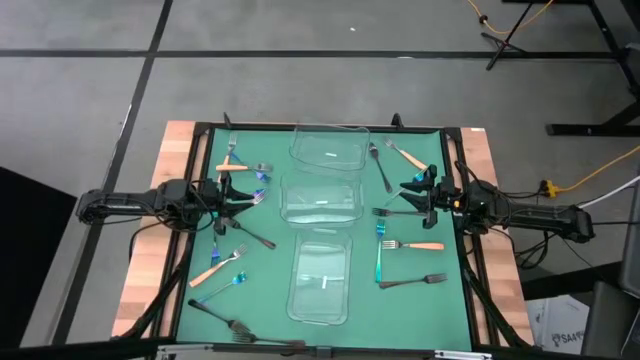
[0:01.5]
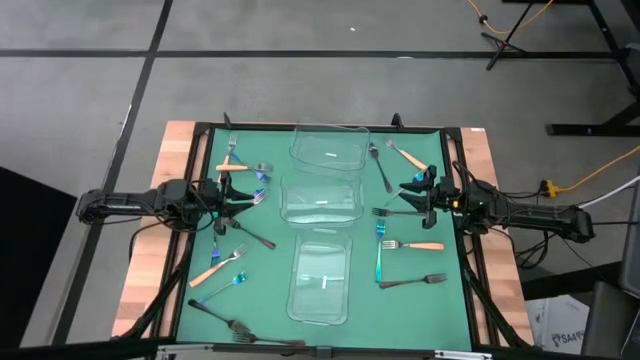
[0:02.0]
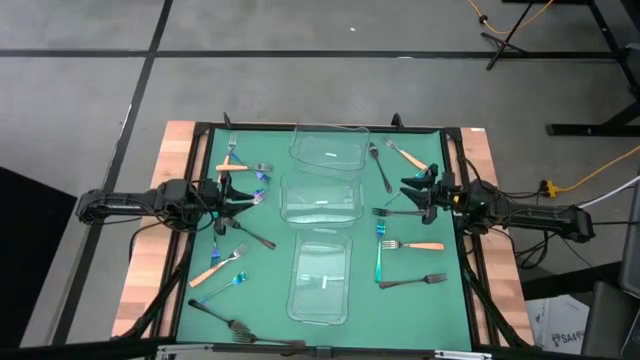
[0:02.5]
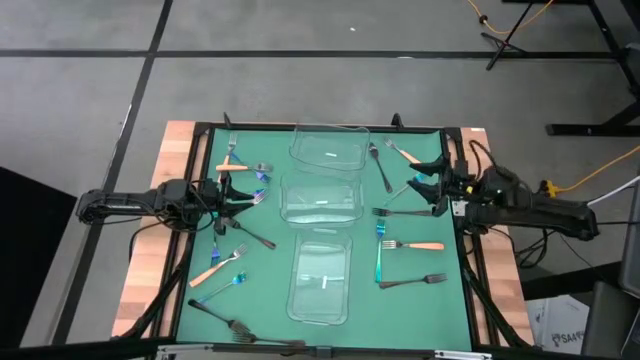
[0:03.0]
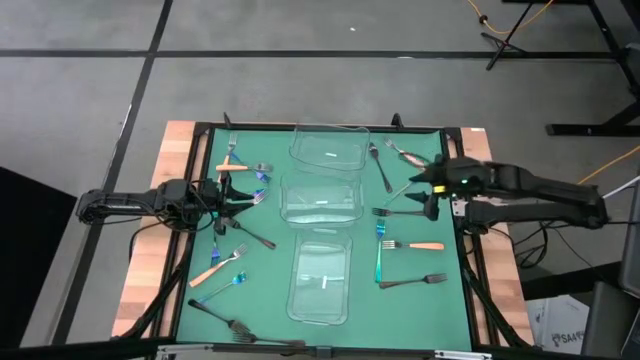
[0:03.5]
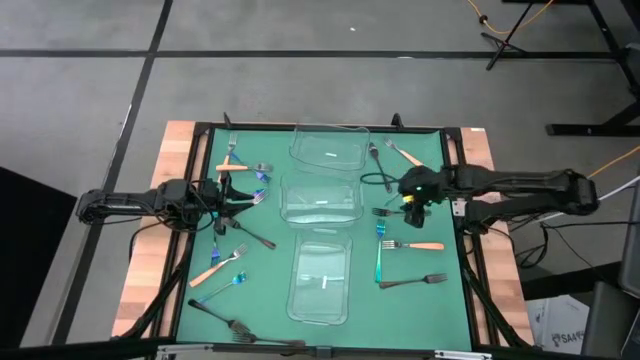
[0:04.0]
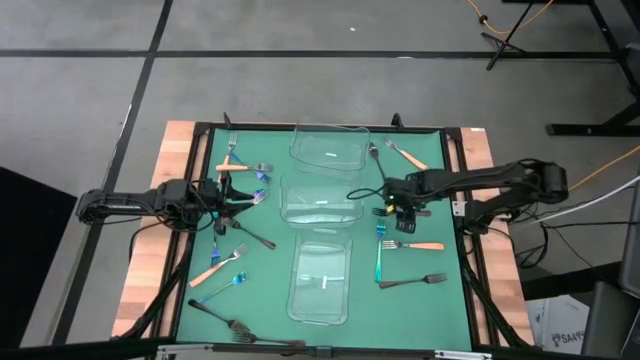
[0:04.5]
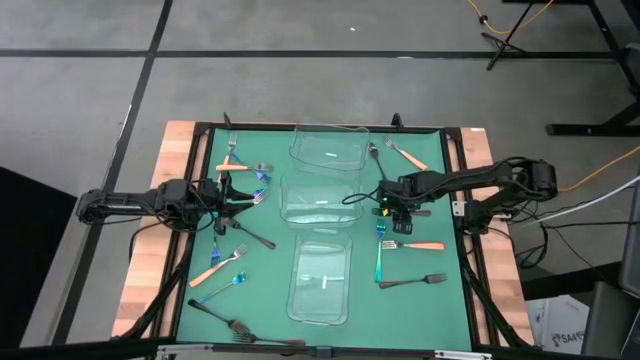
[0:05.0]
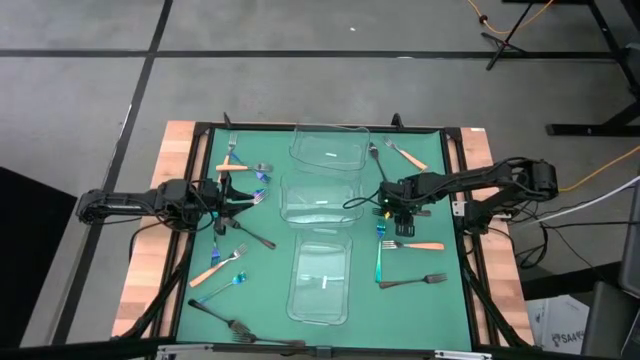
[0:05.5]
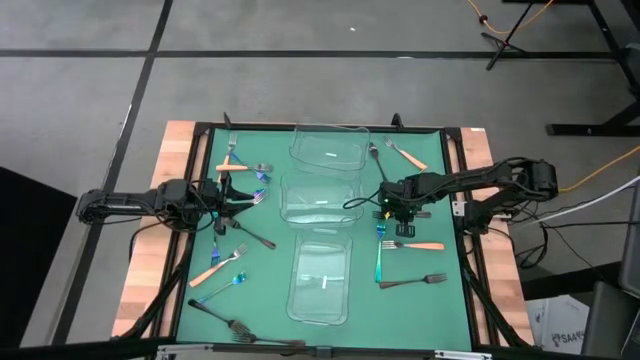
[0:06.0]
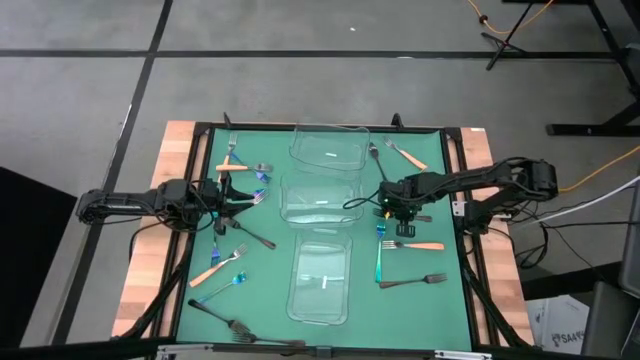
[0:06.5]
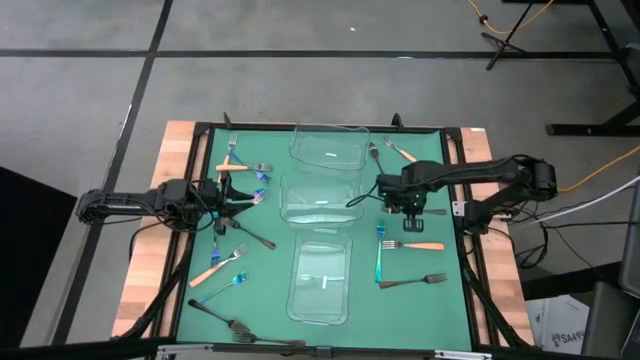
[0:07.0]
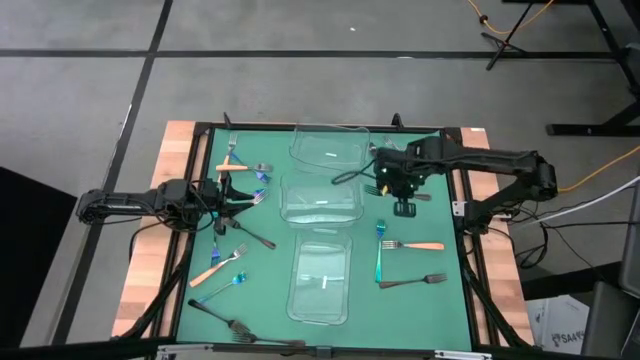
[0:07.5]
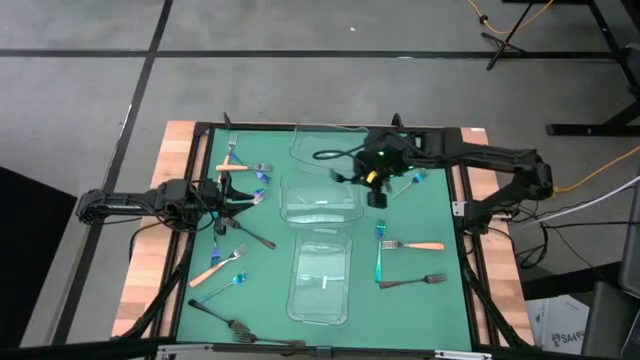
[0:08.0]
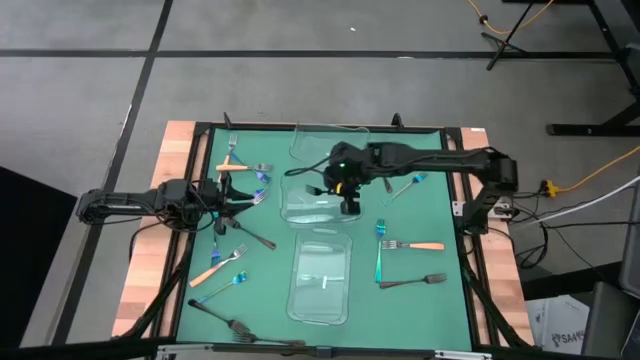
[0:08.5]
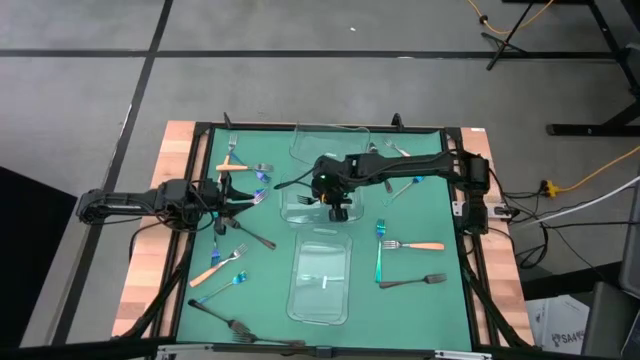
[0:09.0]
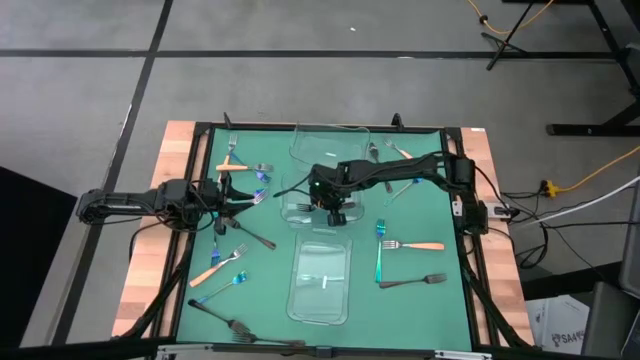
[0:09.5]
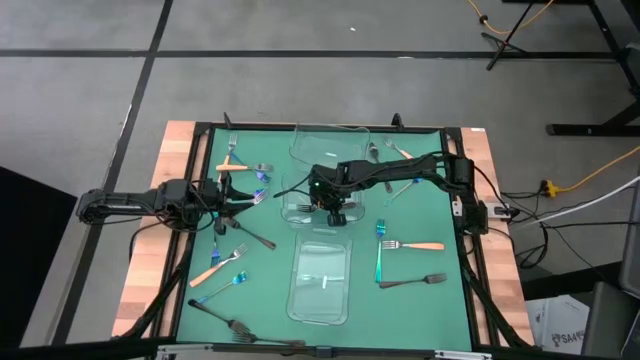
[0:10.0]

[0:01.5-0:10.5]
Task: Sort silverware by color (type)
Put the black fork into the middle transparent bin

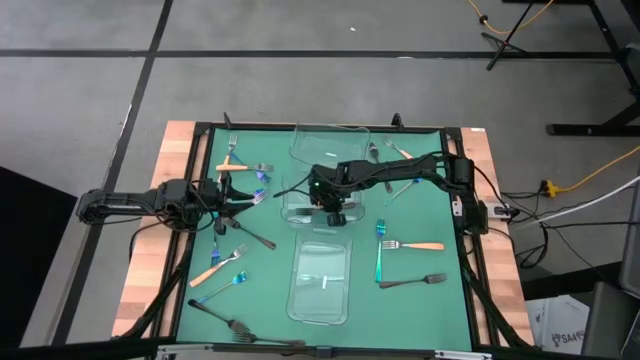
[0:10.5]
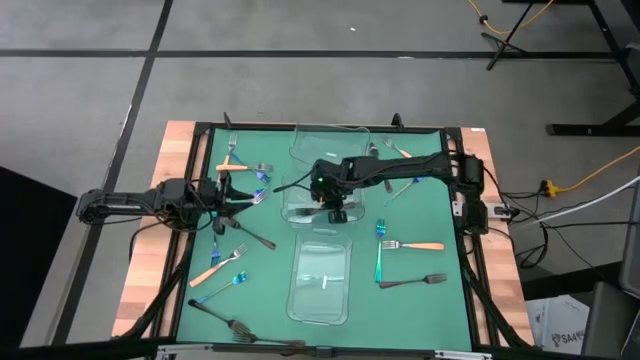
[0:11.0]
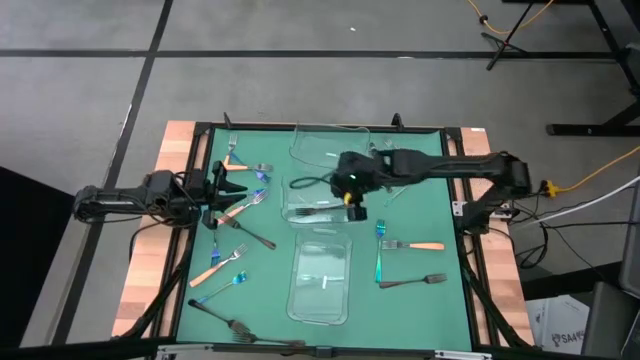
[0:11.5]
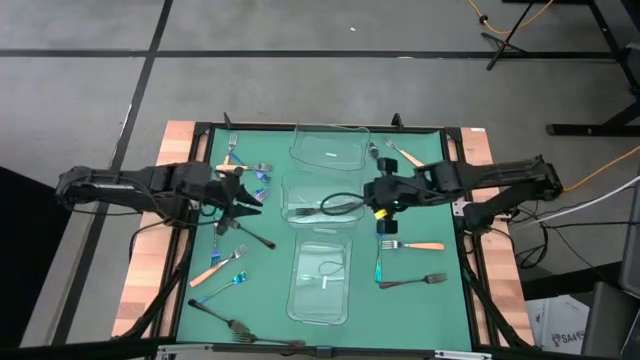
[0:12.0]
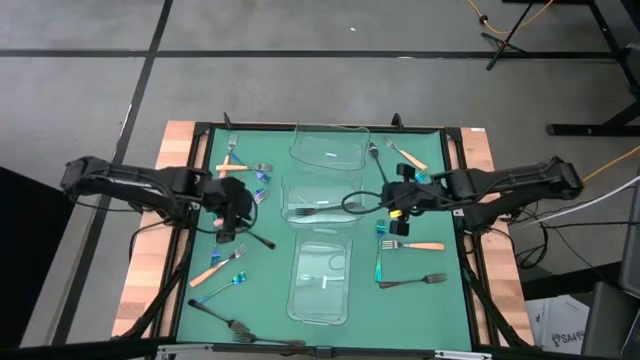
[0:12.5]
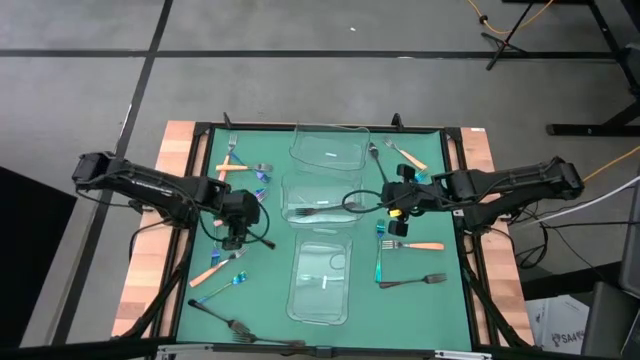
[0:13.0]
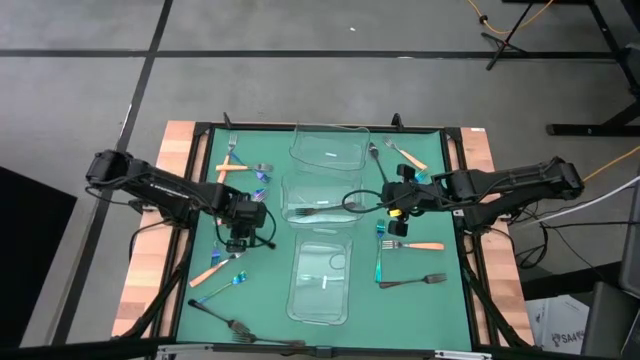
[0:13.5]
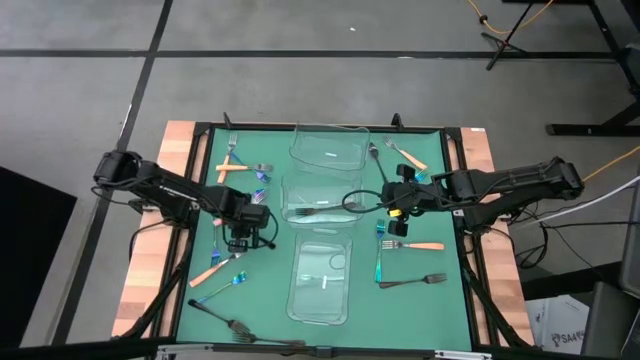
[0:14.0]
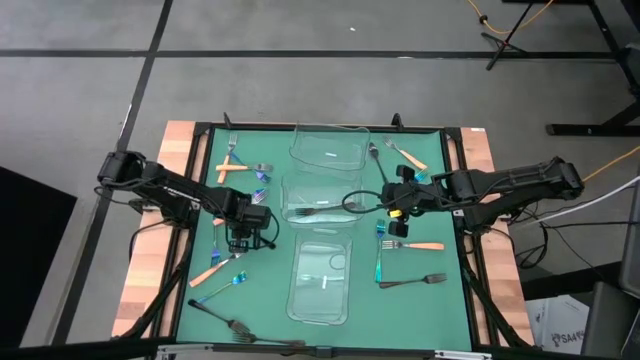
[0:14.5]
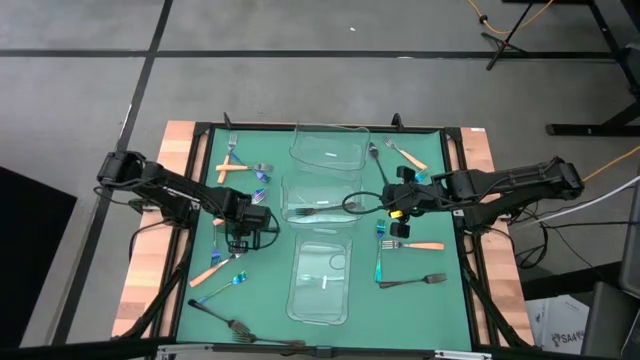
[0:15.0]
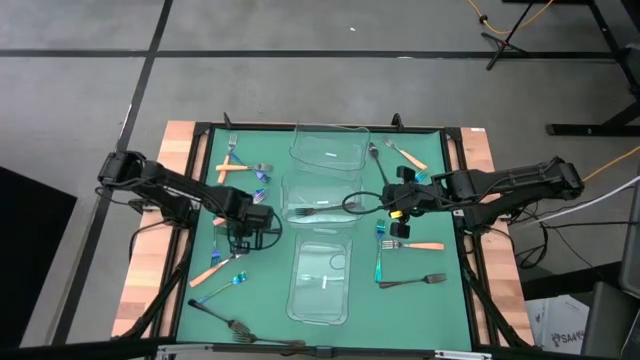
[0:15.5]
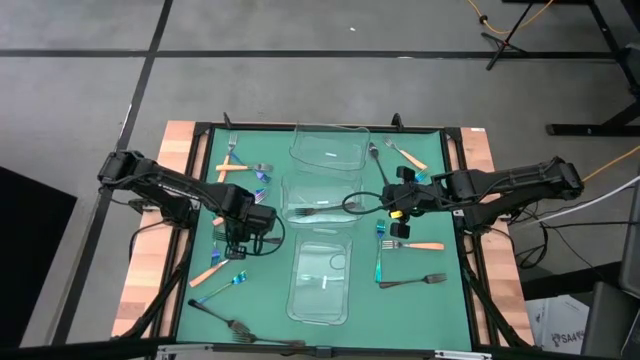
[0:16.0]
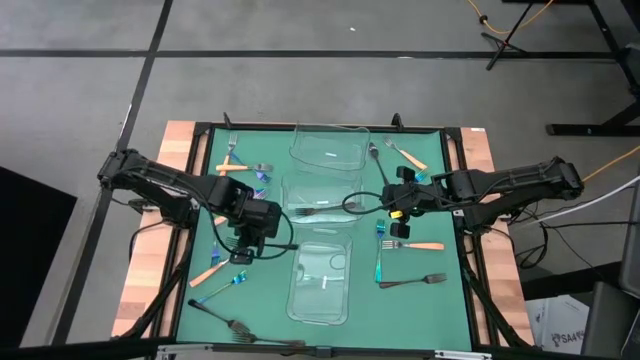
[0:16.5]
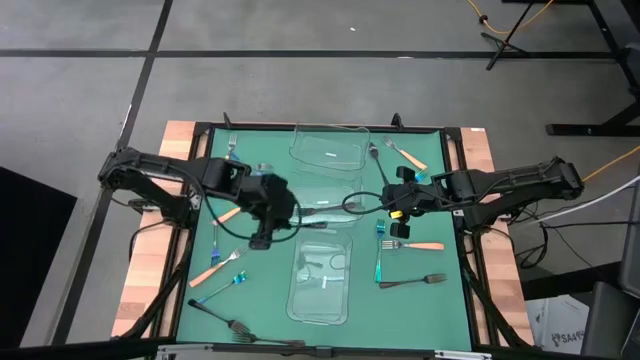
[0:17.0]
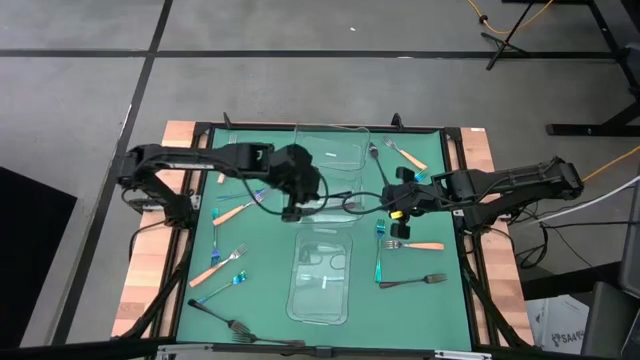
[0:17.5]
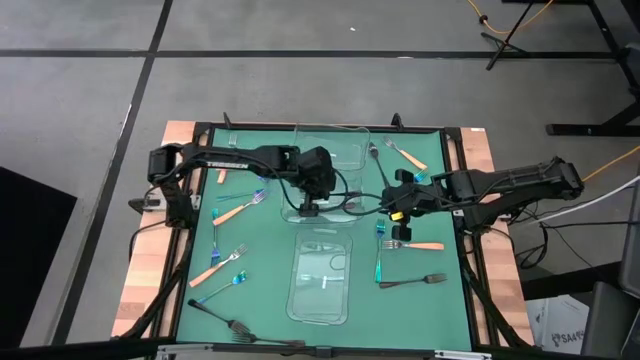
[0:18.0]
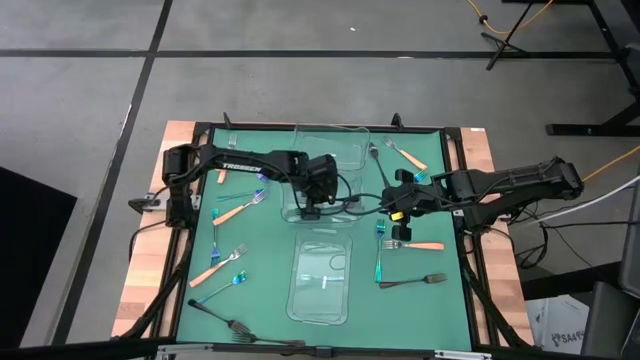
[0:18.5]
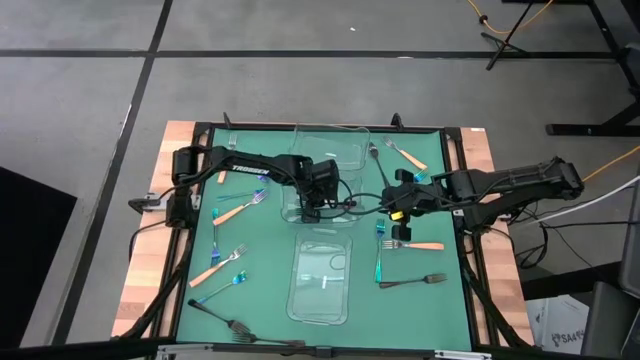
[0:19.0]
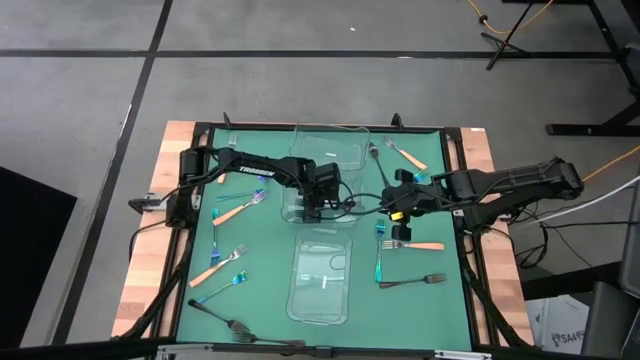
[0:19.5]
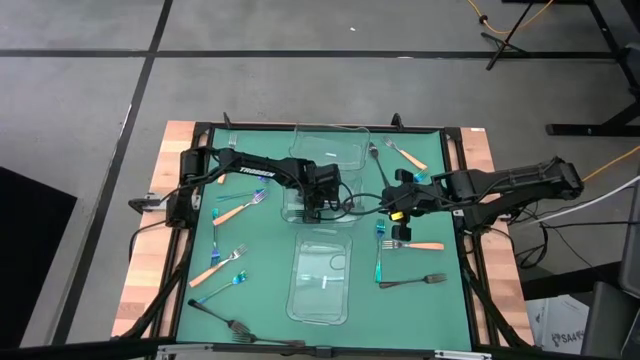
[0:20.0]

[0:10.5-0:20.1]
Put the black fork into the middle transparent bin

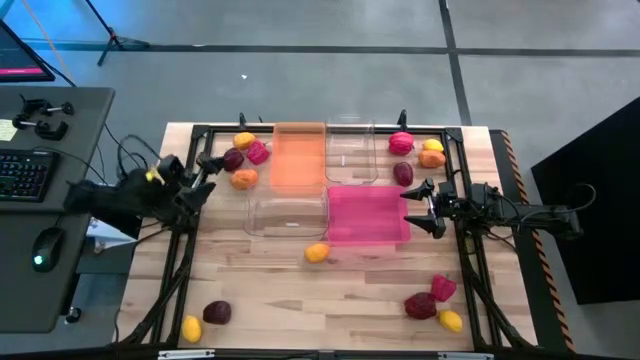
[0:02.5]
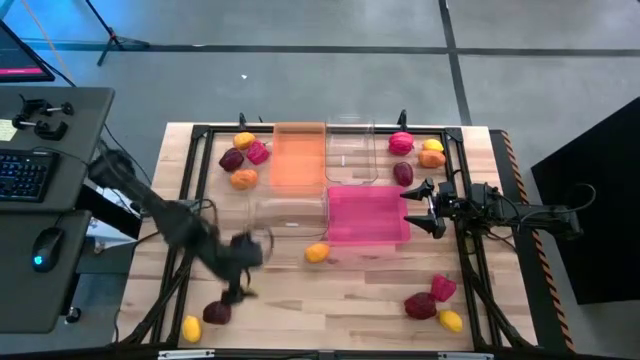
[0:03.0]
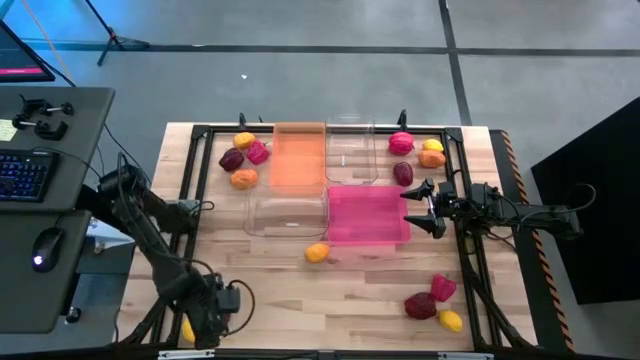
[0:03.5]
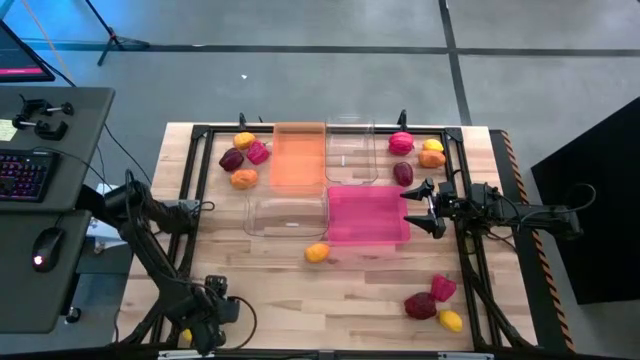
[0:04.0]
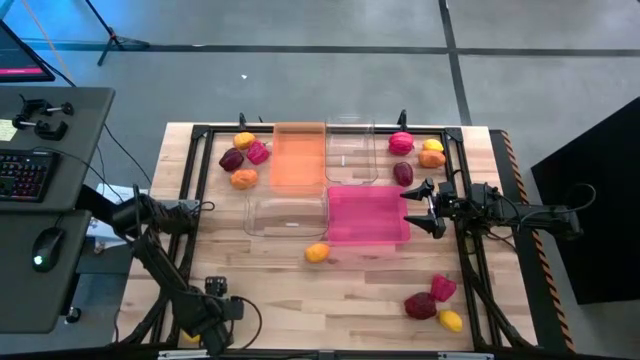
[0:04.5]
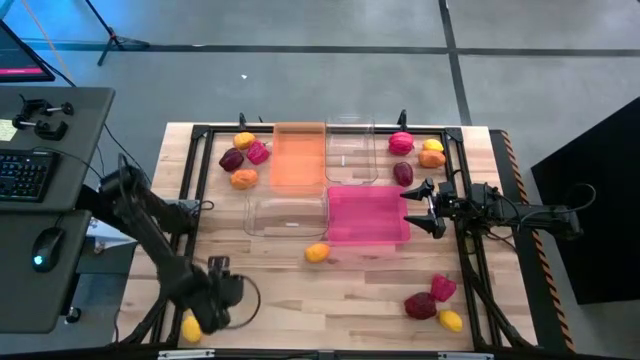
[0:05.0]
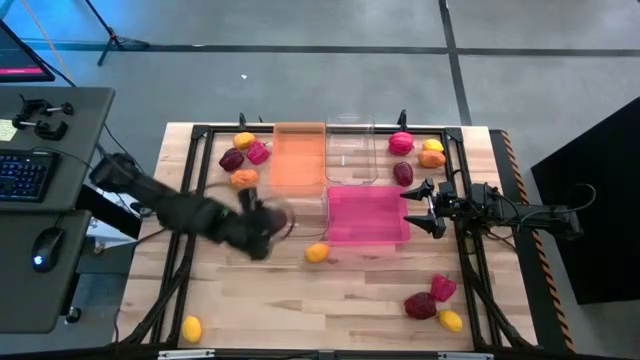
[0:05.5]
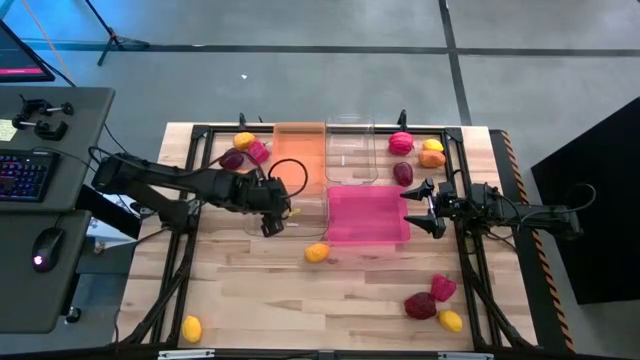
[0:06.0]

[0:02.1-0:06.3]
Task: Sort produce into baskets
Put the apple into the bottom transparent bin
